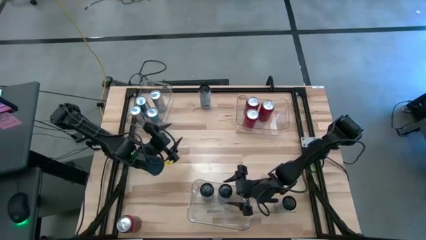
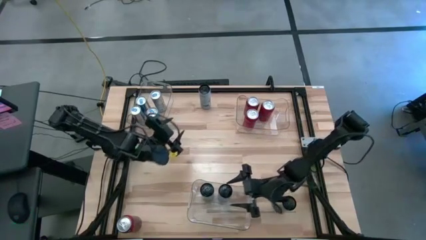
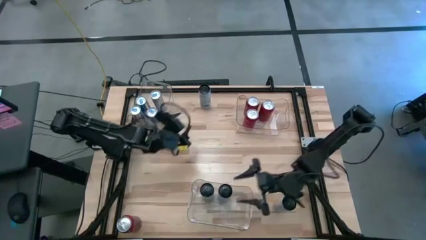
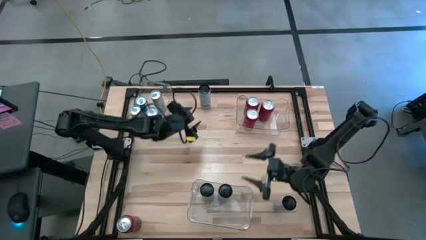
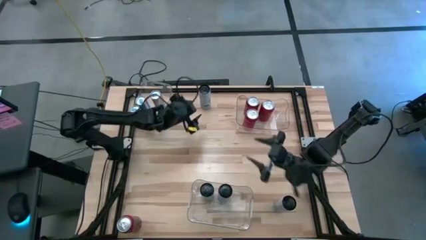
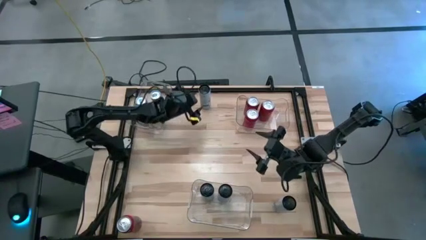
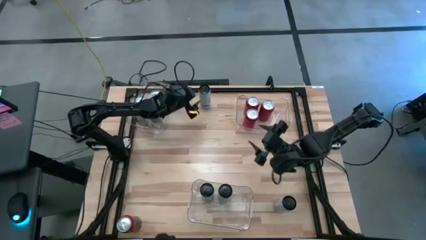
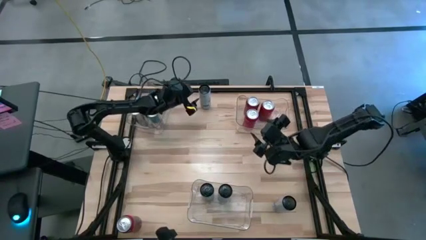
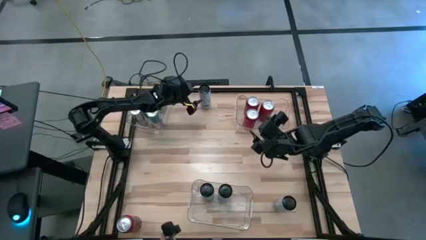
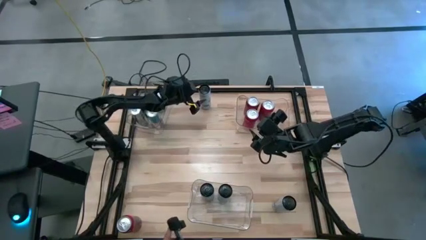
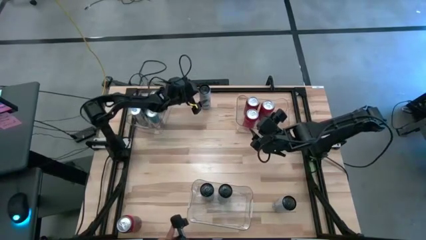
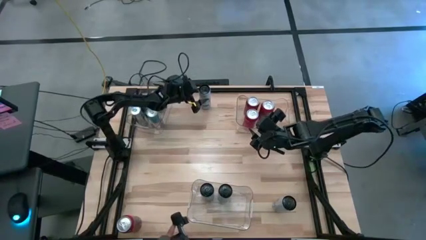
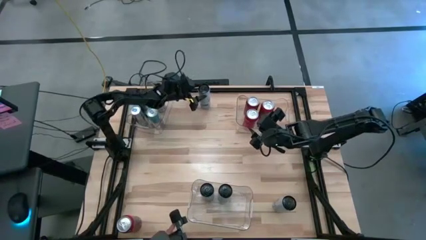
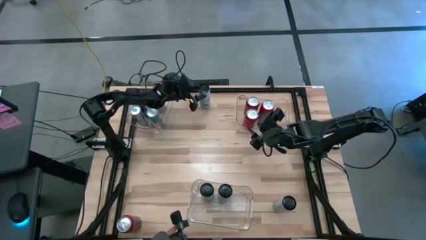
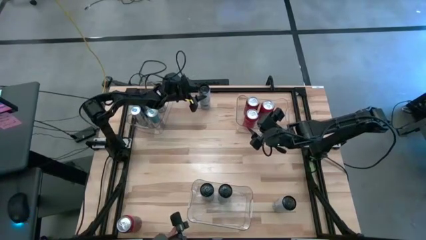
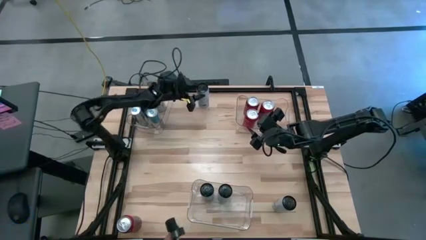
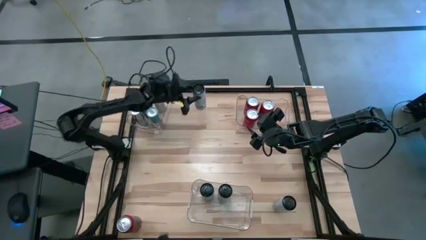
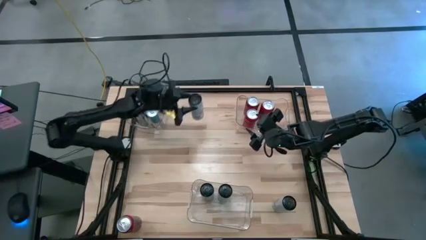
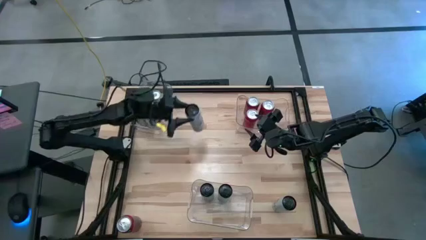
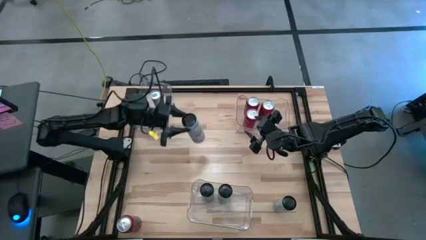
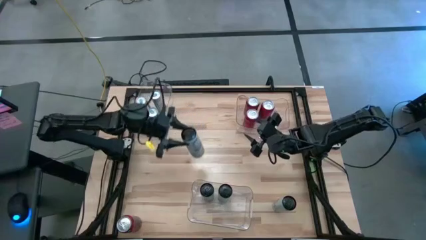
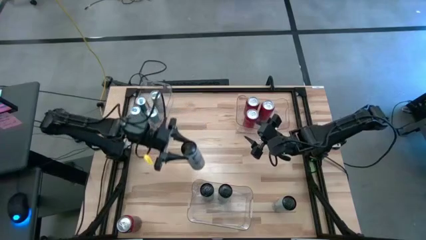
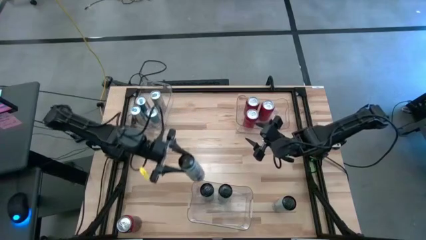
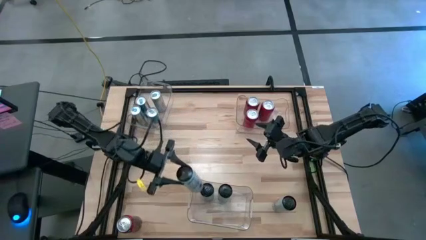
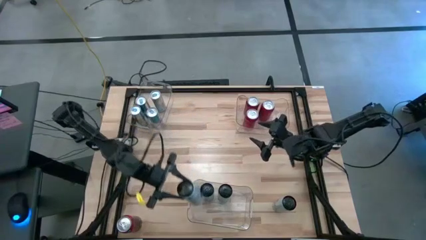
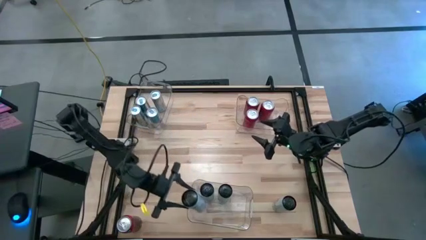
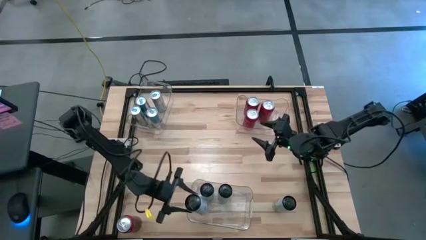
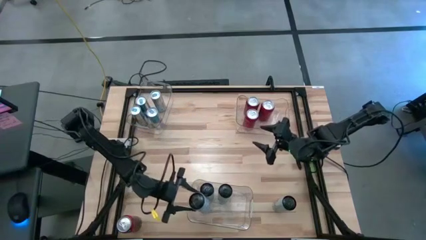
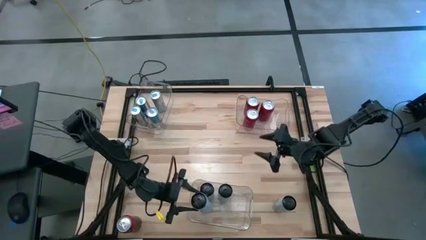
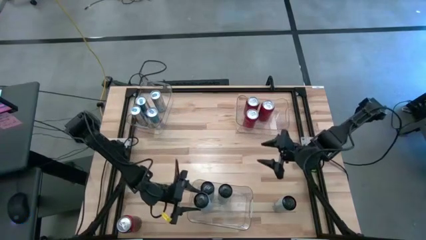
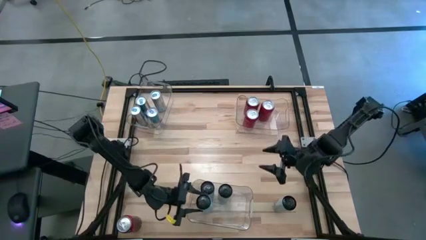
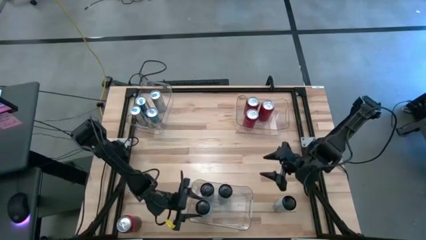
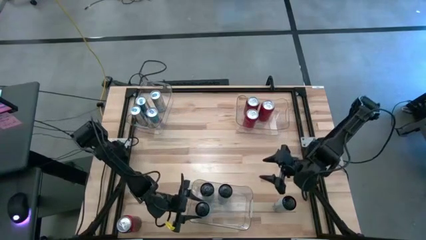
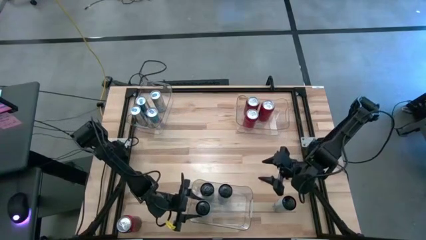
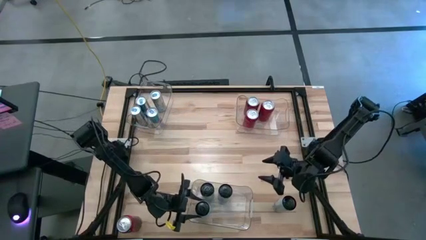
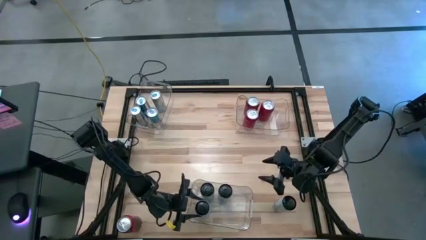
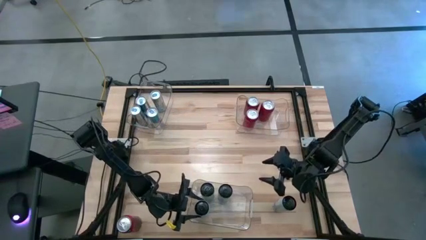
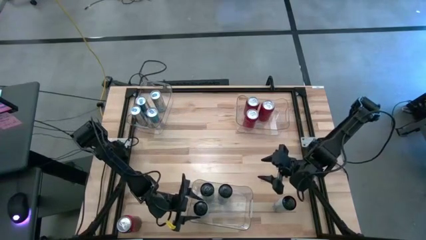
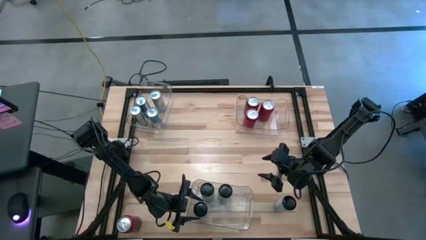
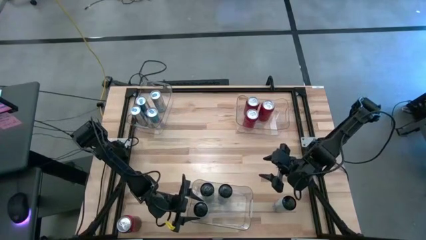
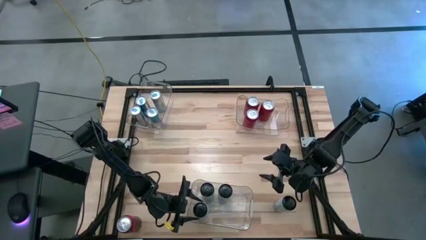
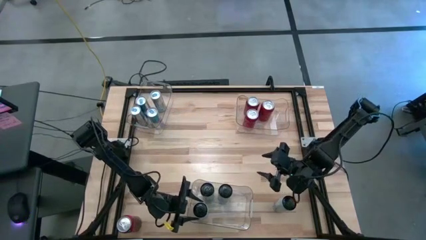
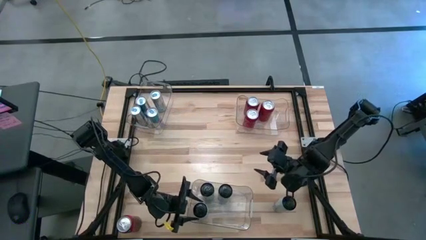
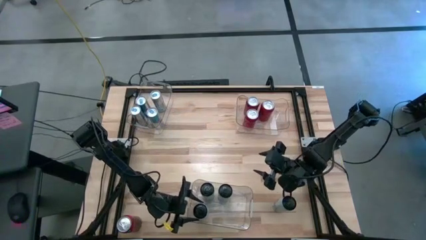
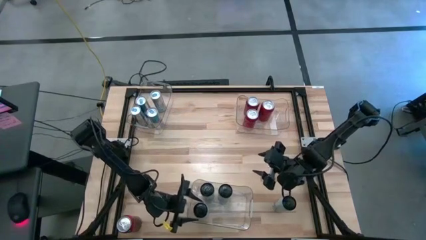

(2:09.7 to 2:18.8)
Task: Sort soda cans
Put the white blue soda can into the bottom transparent bin

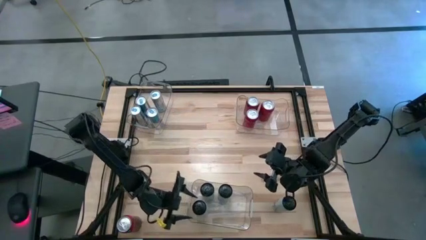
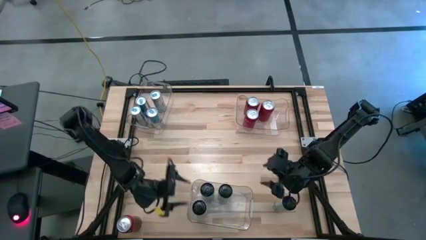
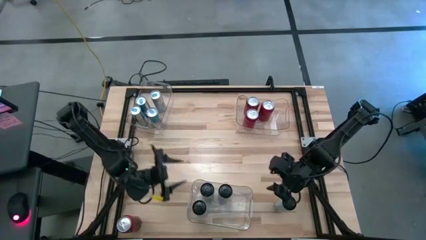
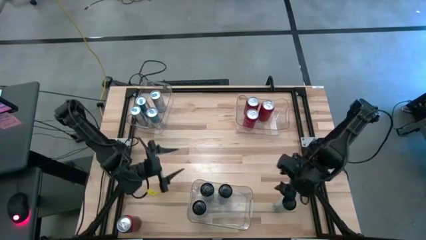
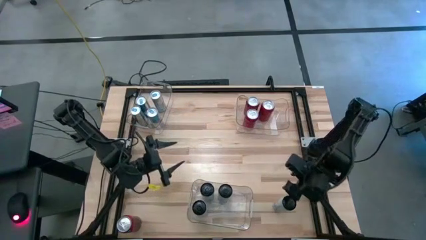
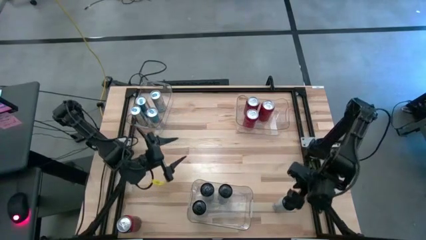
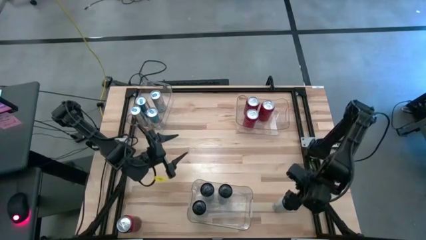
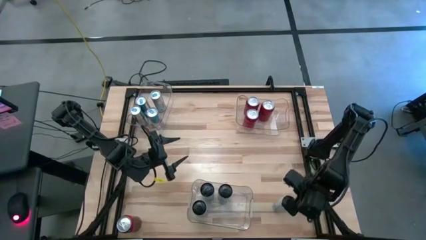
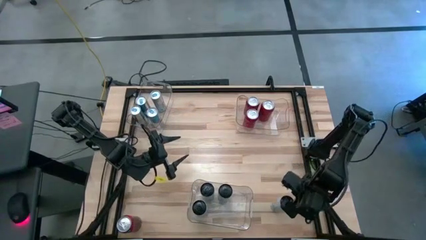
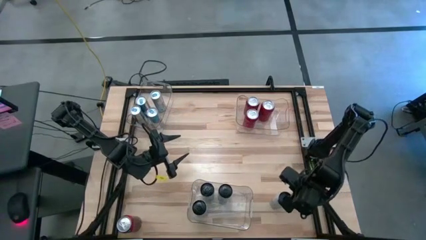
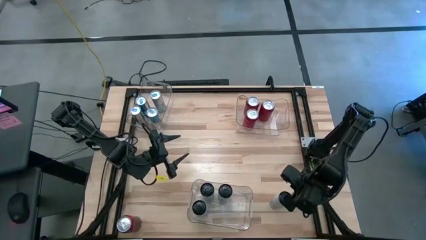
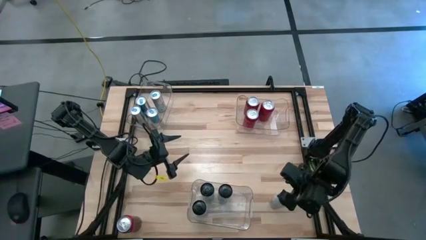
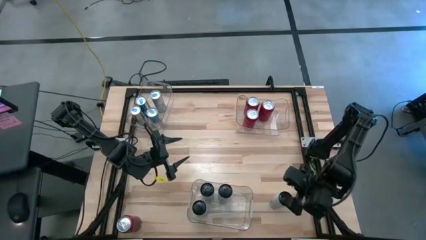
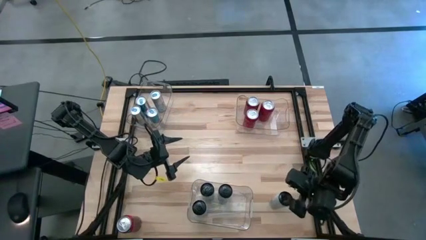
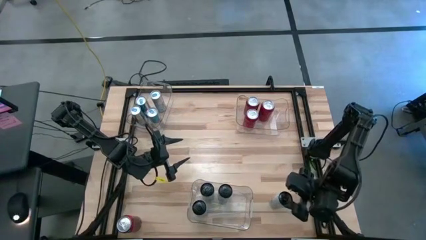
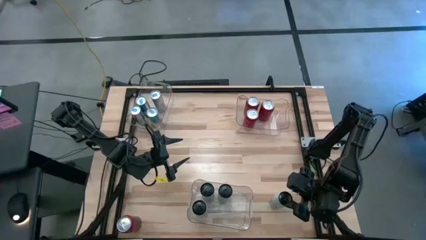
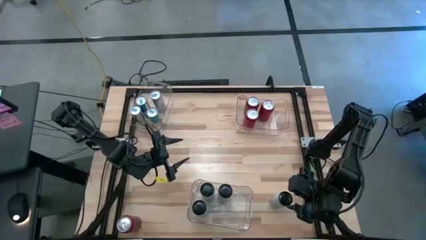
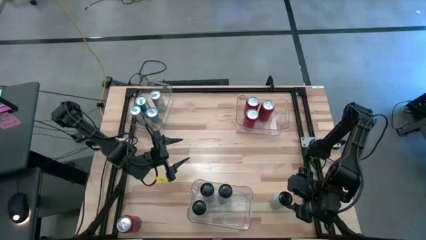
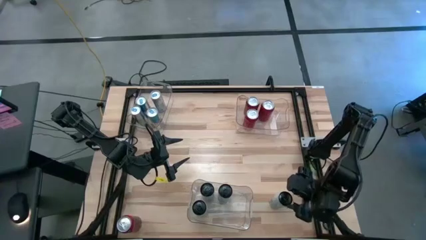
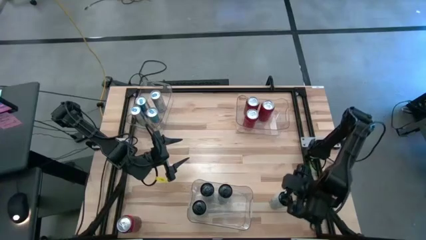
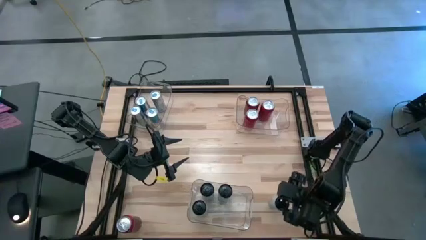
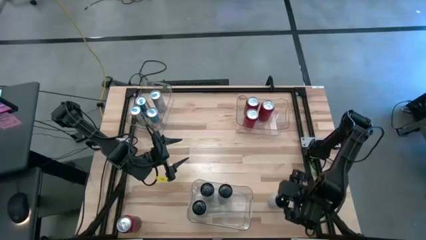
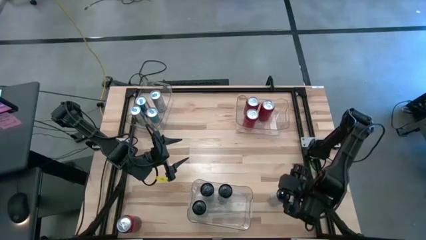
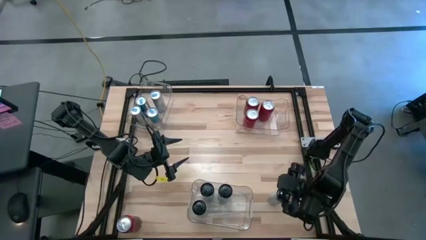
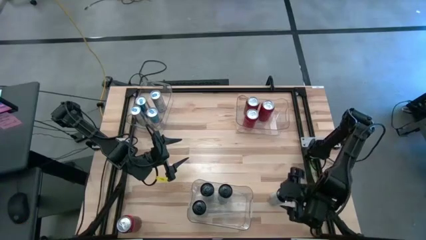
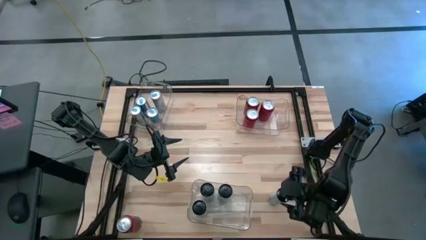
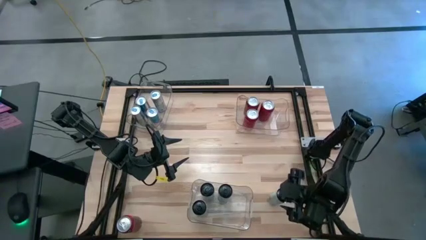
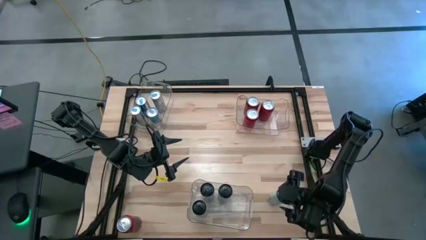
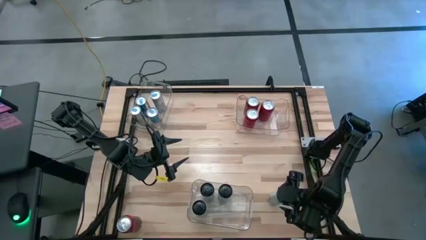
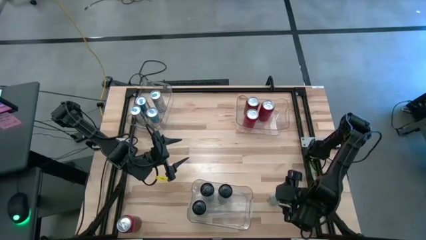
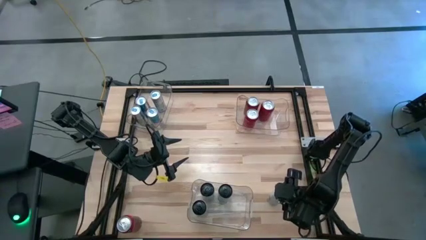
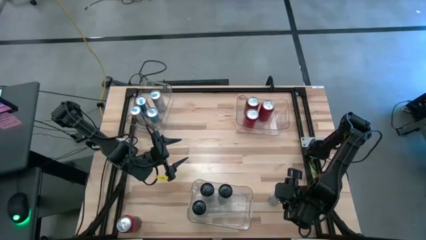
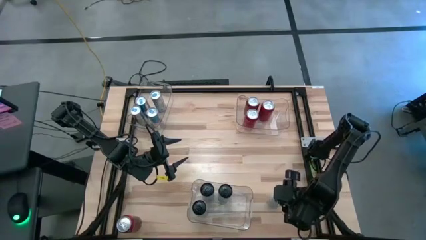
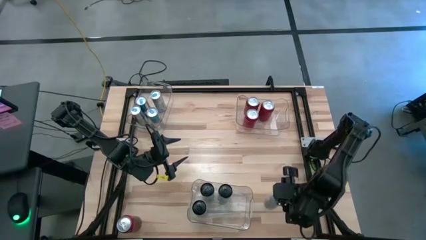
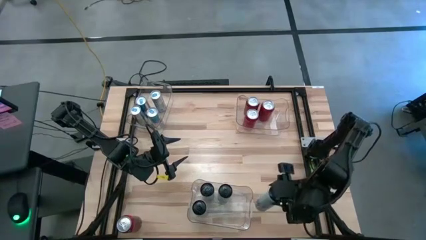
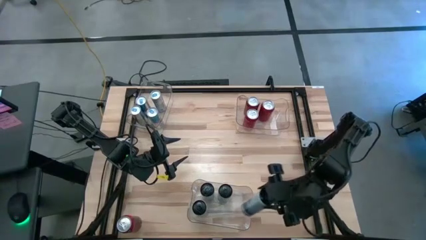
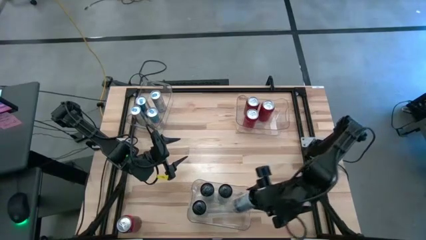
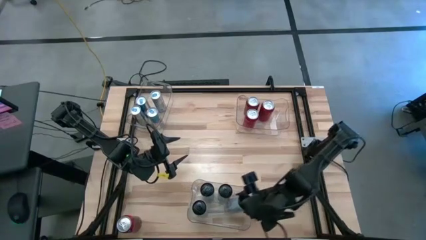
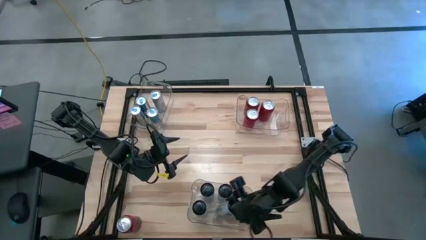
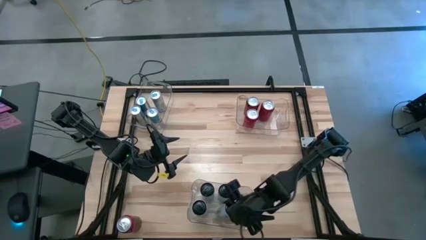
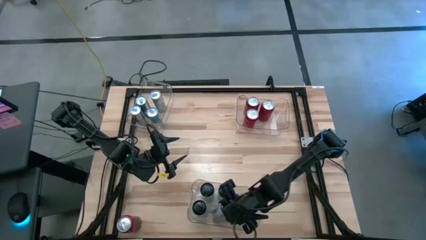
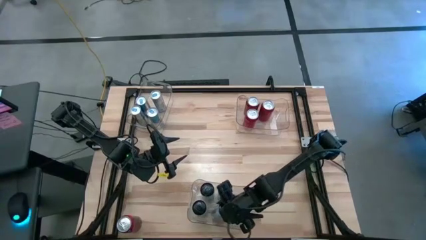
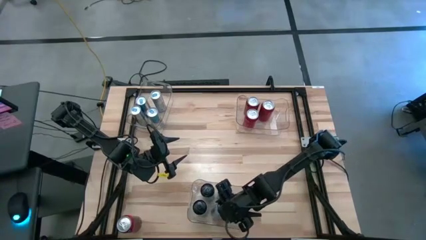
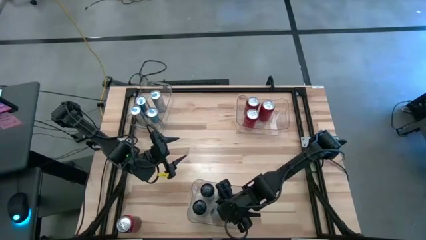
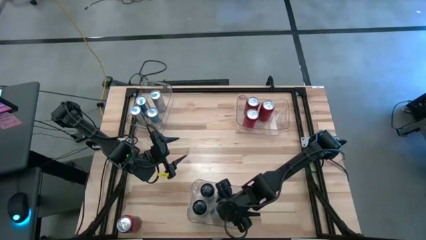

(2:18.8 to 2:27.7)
Put the white blue soda can into the bottom transparent bin
